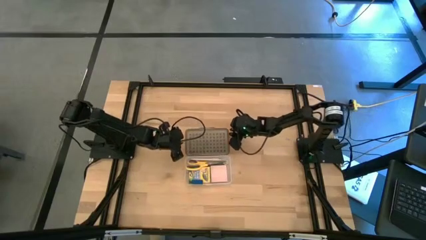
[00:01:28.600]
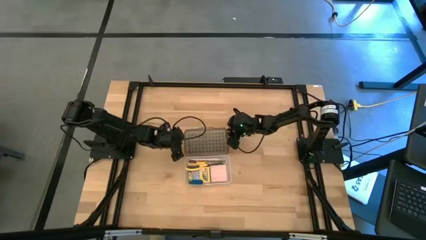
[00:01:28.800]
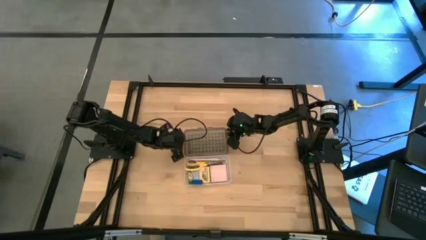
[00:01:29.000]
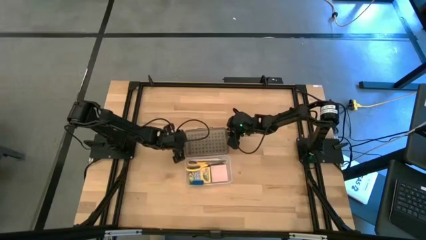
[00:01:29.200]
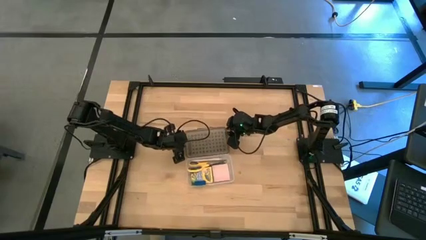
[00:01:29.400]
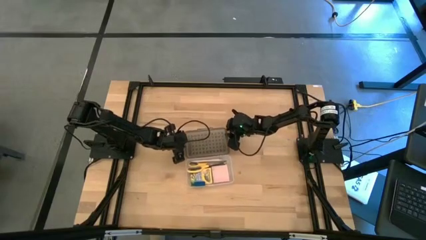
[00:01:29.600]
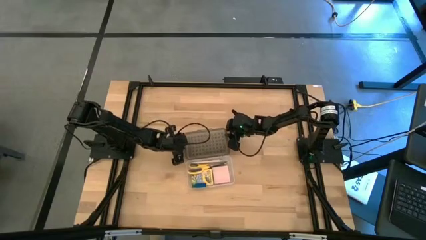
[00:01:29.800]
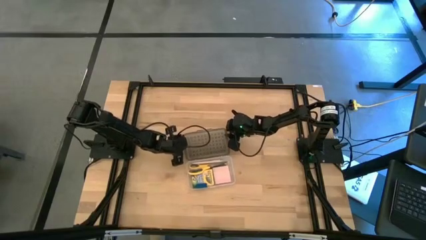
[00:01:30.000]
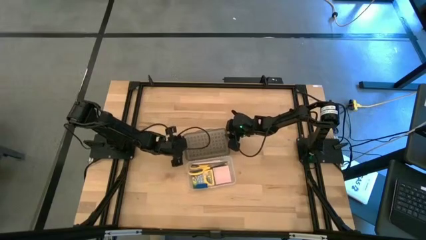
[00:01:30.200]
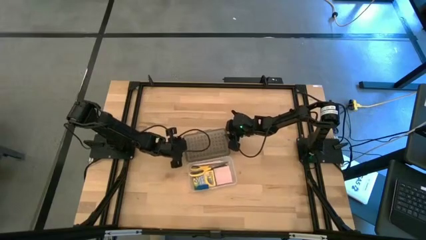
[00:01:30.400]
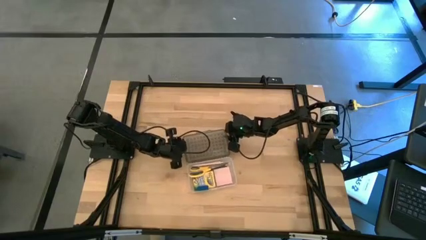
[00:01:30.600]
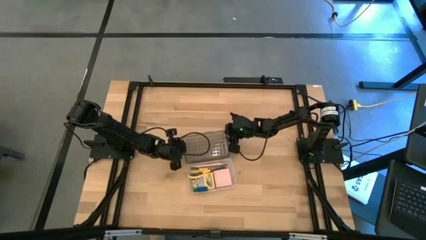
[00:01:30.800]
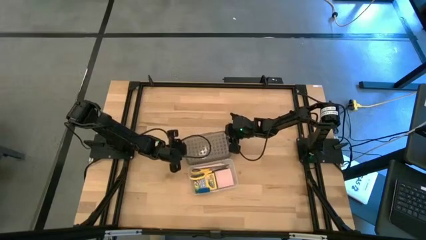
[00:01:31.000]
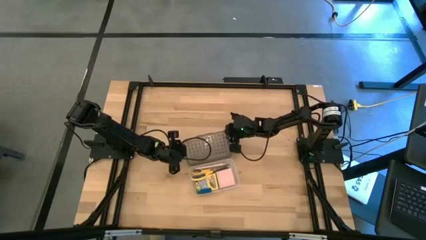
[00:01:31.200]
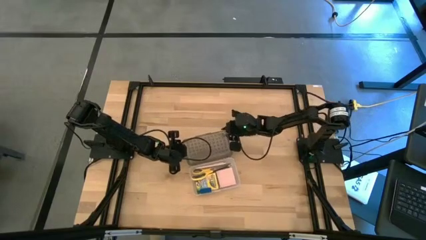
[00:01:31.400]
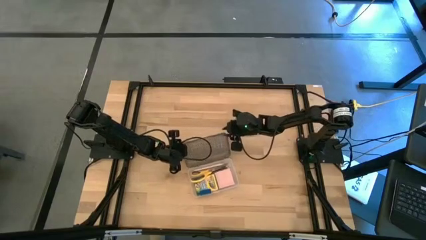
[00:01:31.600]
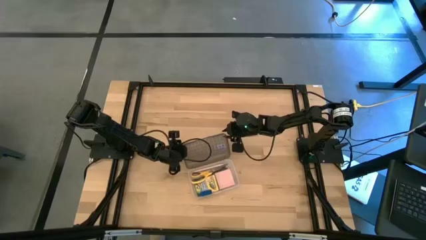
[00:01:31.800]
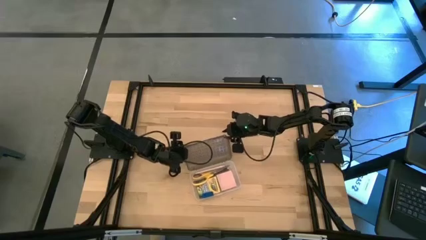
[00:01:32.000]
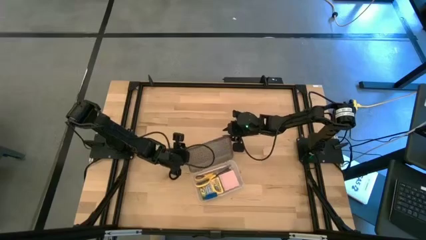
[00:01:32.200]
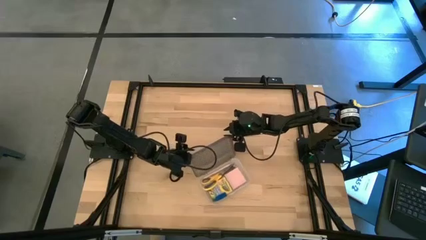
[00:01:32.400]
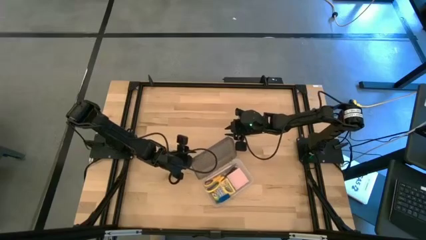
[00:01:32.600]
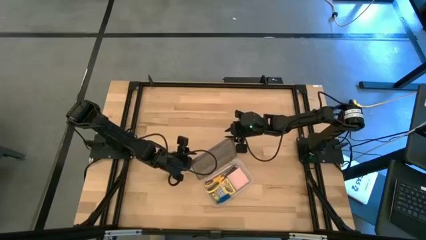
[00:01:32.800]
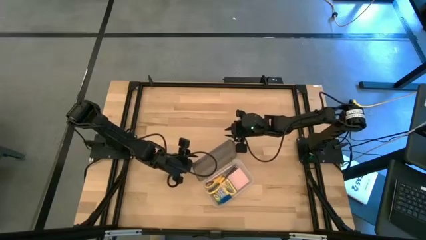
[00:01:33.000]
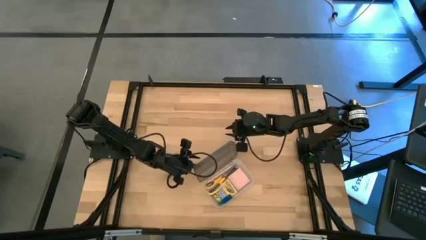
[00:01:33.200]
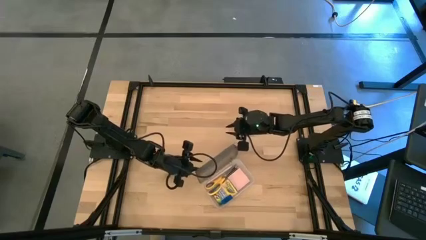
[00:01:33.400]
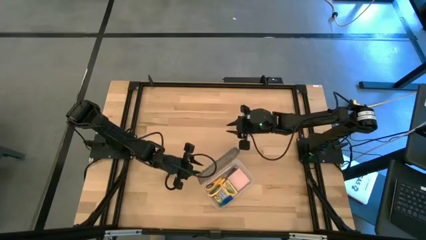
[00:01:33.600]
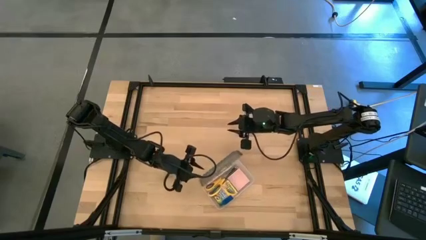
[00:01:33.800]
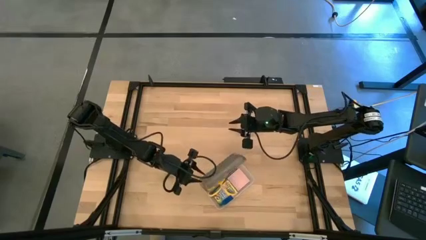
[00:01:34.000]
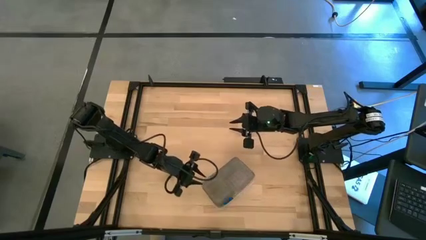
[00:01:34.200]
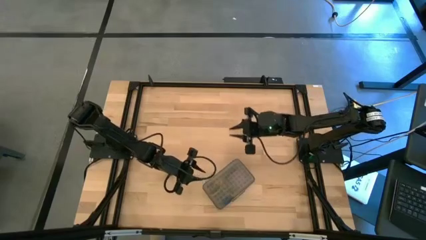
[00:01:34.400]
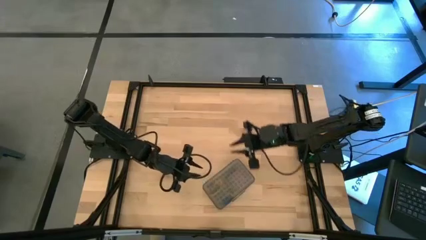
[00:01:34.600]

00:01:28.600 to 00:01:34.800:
Task: Pack school essentials
Close the transparent supply box

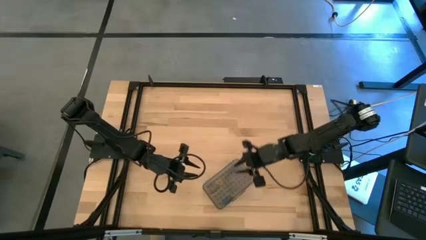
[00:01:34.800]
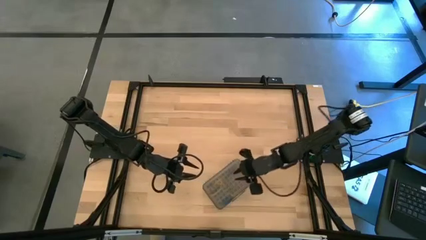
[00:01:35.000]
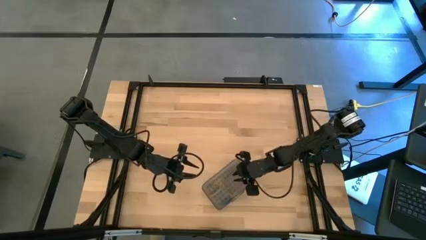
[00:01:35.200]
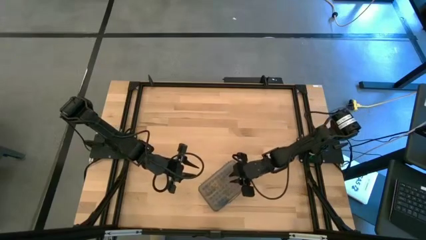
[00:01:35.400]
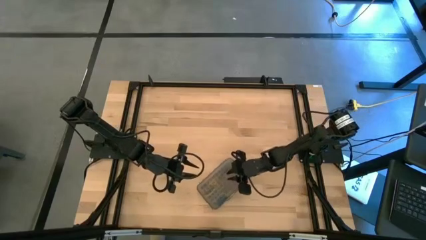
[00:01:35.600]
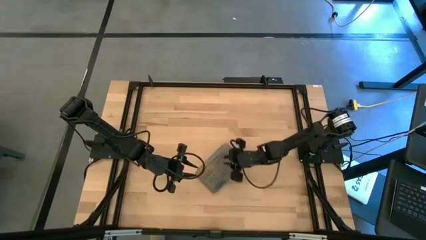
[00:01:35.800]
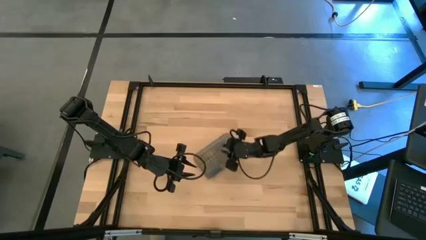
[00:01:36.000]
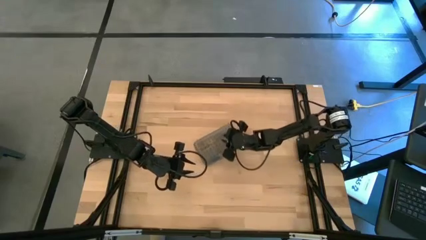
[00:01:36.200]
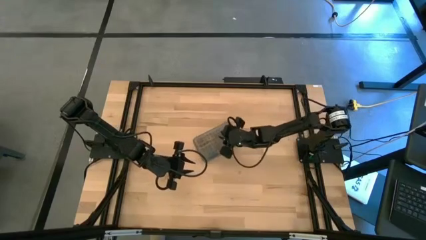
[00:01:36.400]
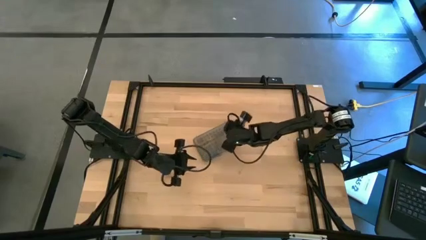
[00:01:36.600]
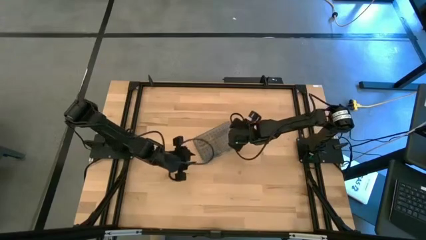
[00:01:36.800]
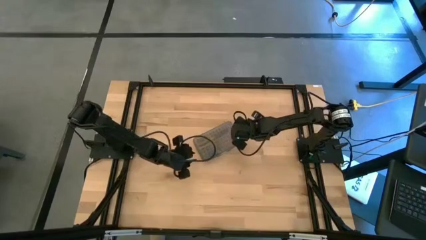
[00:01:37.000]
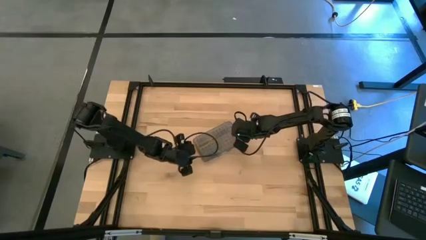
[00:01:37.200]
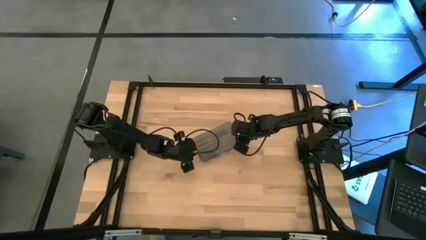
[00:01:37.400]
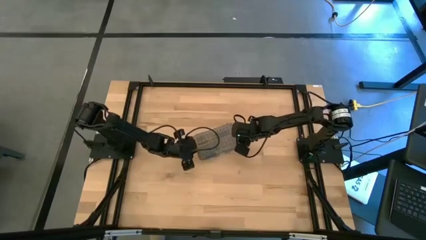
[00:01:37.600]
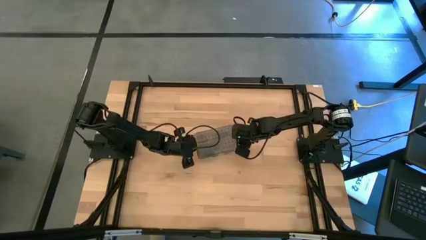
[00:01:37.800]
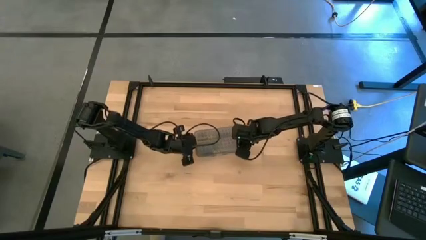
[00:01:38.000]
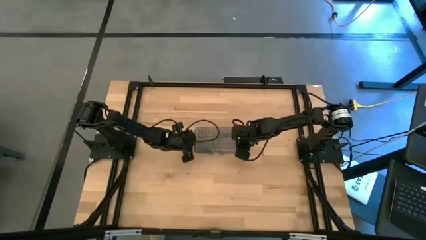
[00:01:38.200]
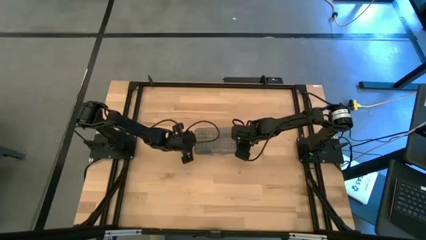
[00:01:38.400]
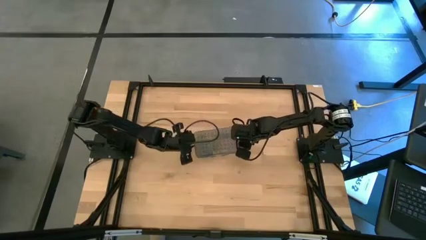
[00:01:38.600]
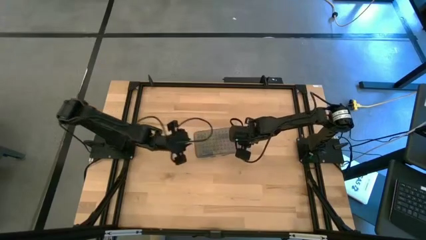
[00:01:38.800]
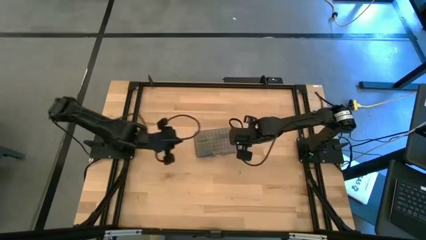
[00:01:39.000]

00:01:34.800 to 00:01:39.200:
Move the transparent supply box from the bottom to the center of the table

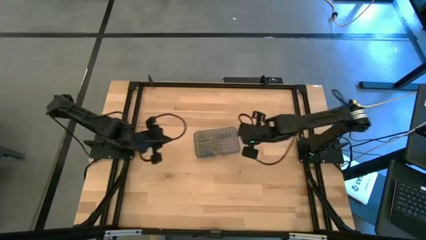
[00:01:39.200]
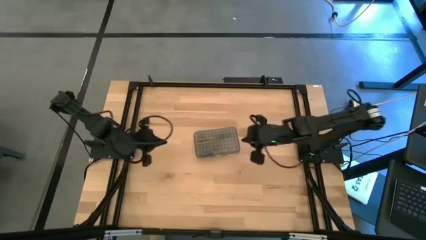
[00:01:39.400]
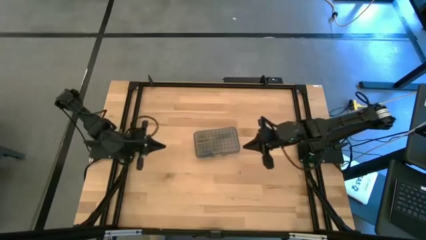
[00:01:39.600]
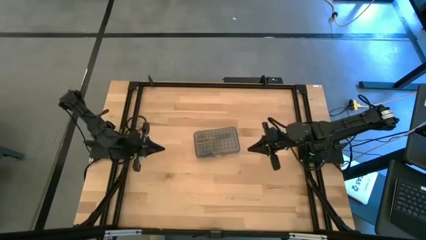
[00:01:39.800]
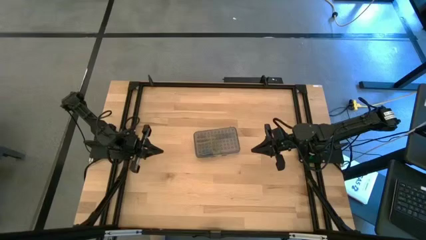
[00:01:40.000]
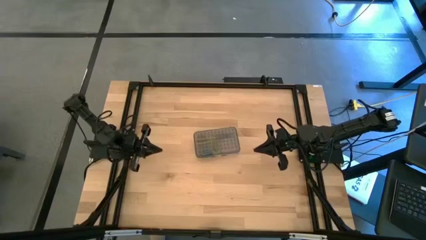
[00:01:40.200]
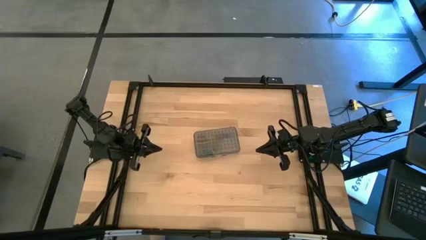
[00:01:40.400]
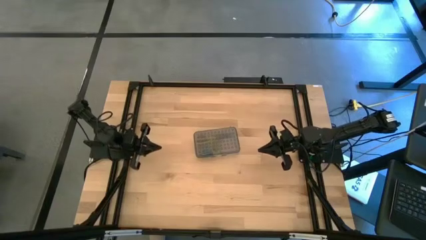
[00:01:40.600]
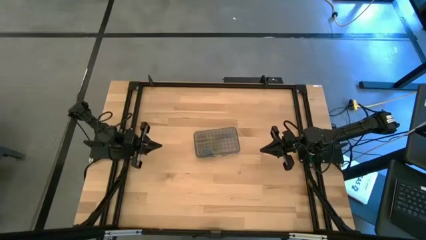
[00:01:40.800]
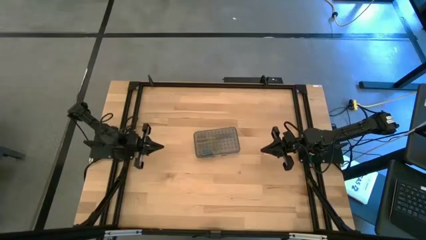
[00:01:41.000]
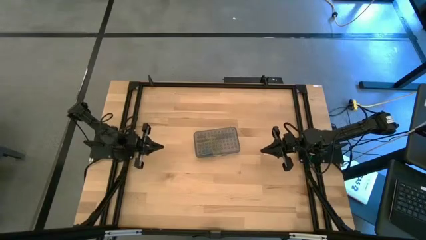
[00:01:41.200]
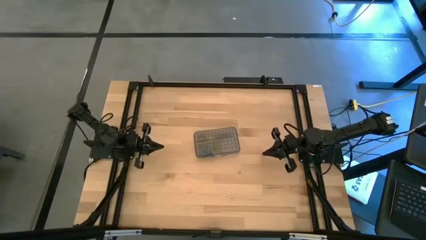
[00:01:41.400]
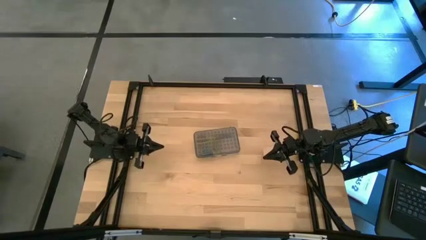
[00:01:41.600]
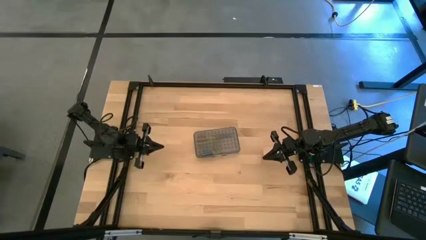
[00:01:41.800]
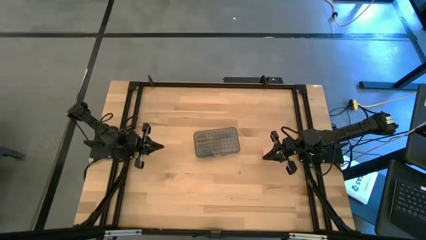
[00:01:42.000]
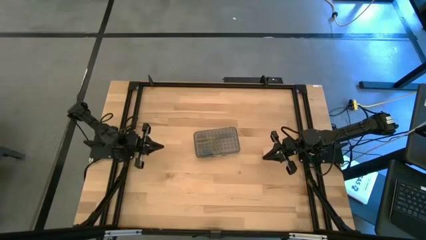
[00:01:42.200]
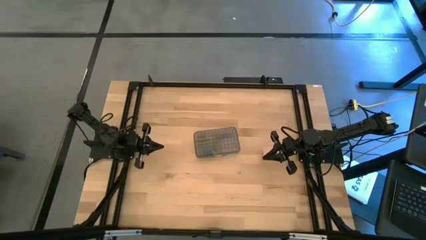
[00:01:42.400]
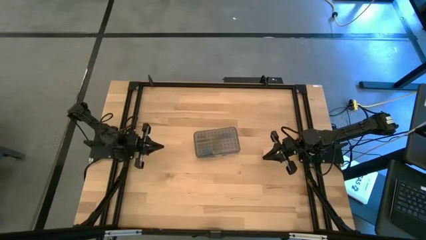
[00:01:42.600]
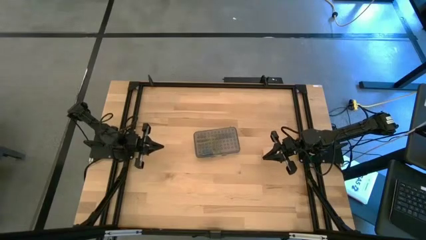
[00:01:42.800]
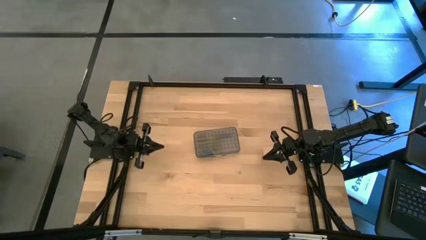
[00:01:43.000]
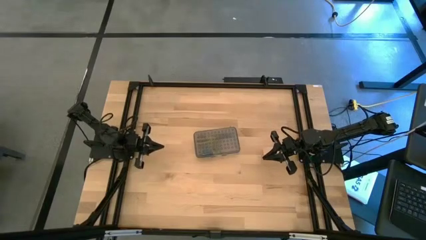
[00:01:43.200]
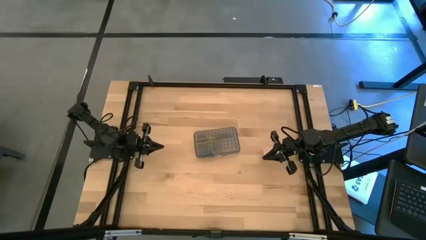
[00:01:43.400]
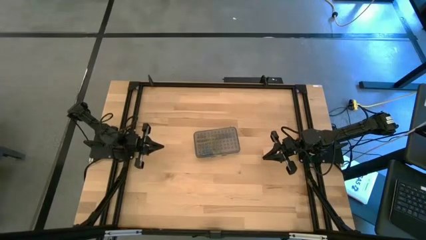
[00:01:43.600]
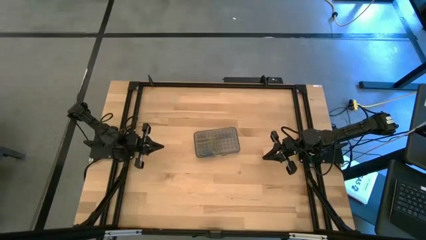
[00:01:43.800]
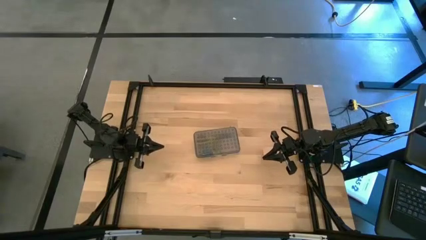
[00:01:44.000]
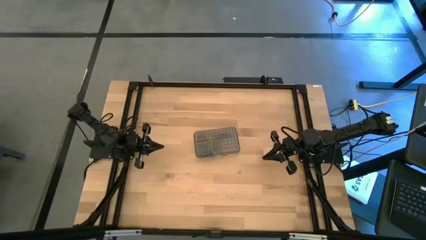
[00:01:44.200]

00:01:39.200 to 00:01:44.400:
Return to Home Position
